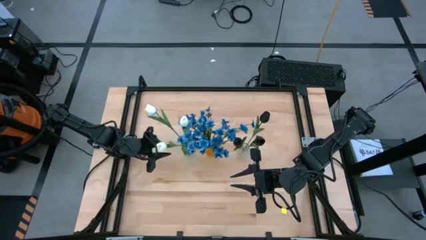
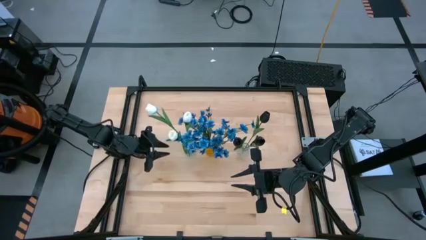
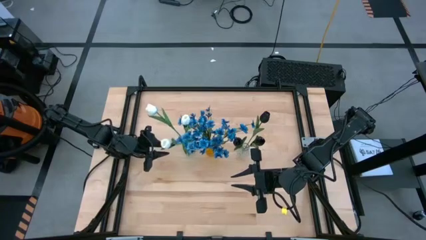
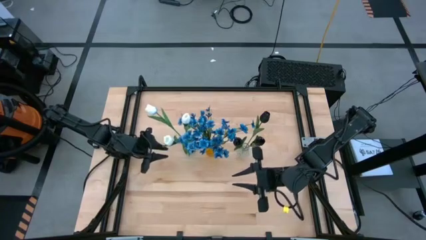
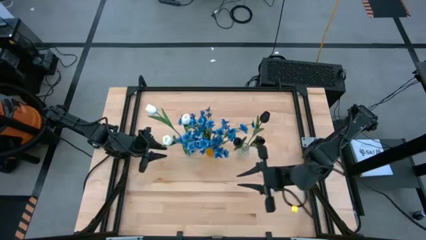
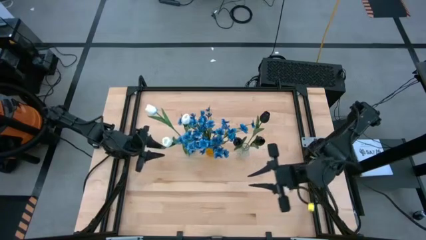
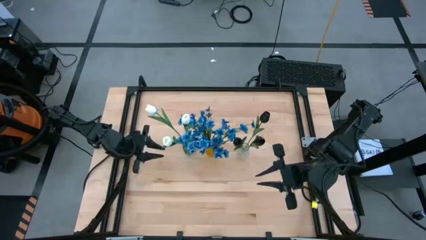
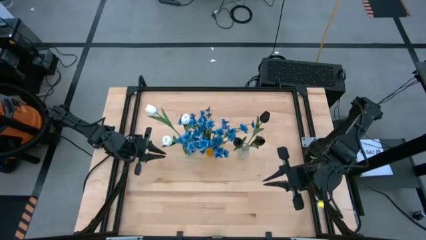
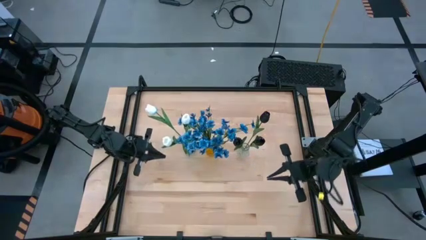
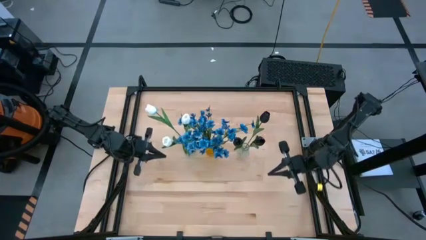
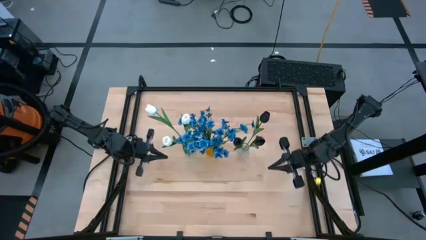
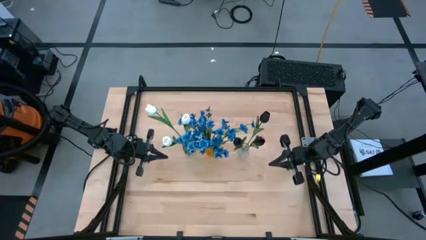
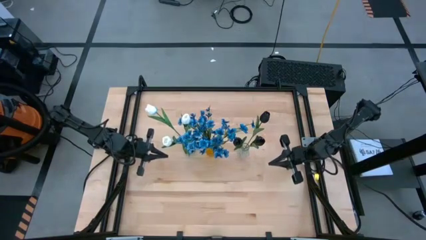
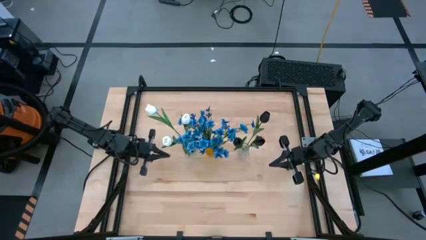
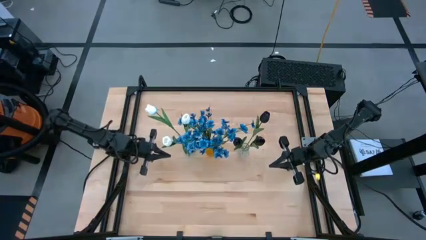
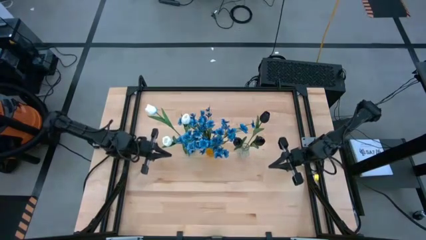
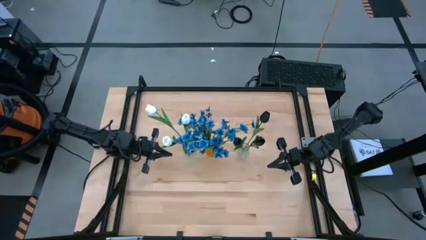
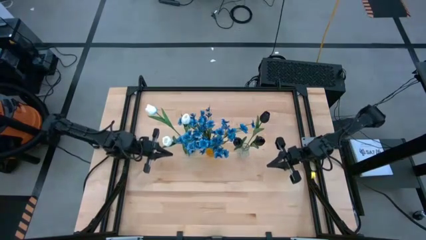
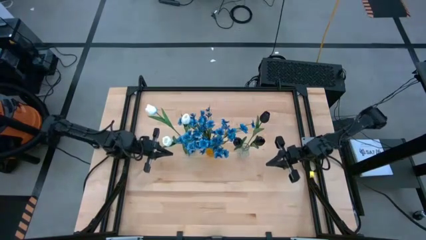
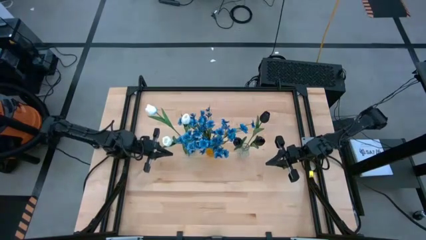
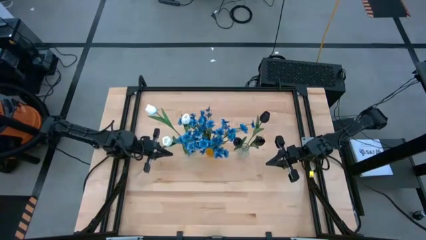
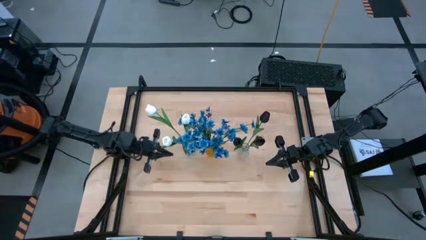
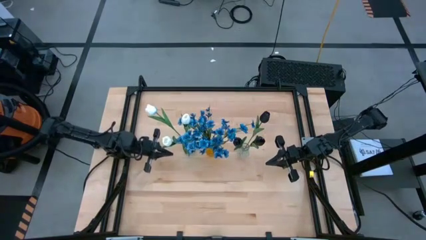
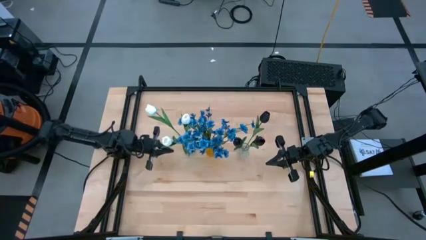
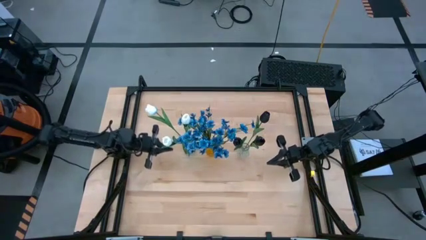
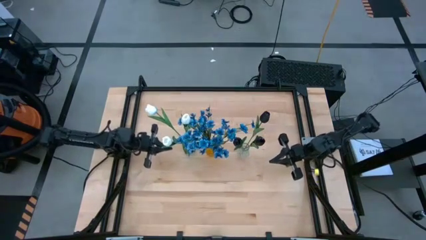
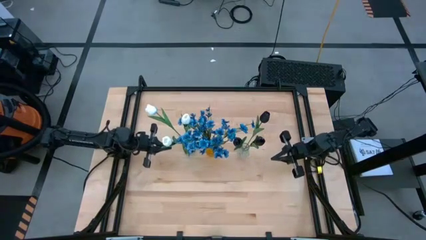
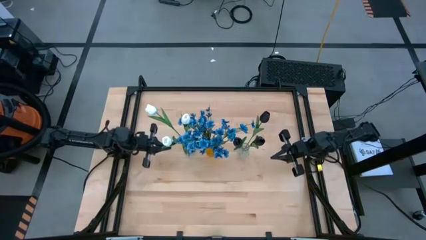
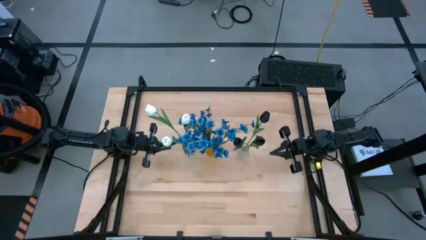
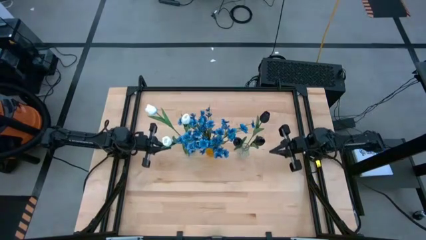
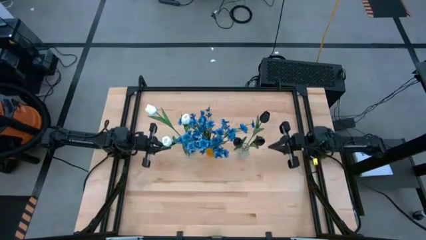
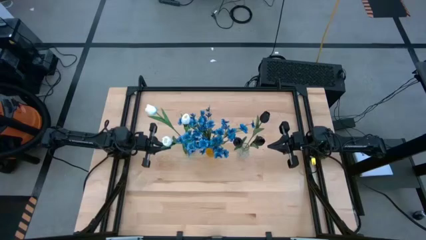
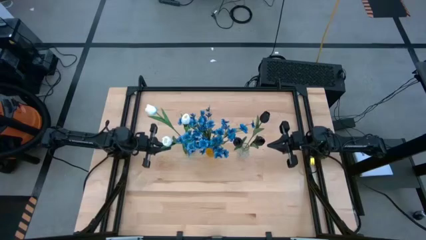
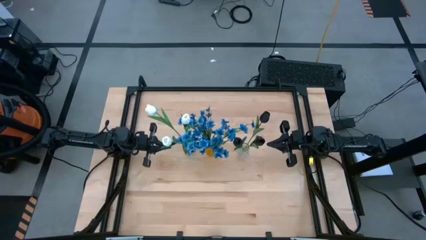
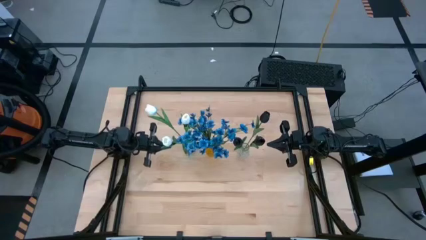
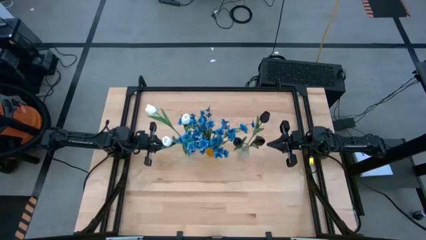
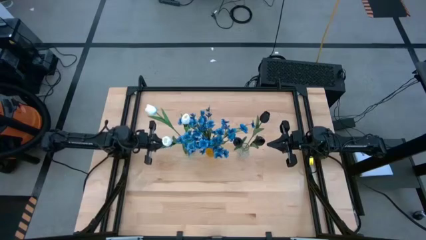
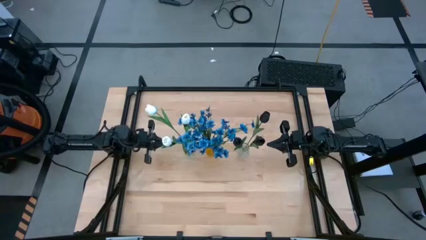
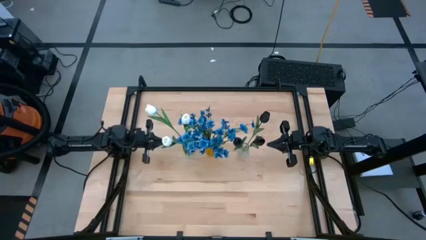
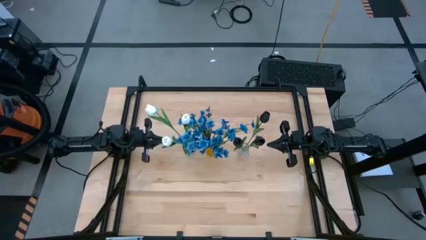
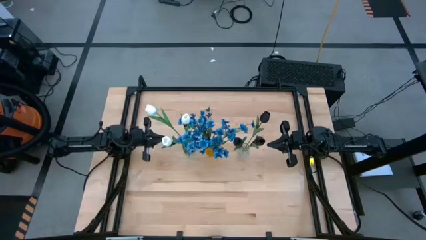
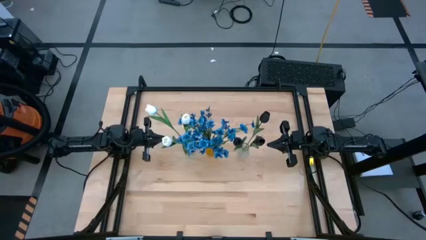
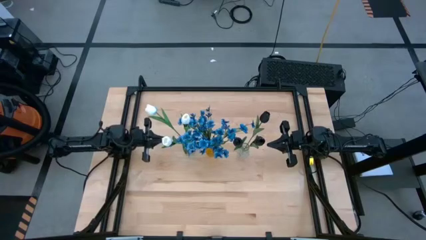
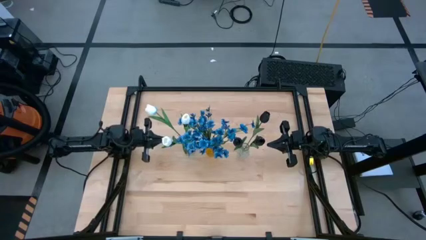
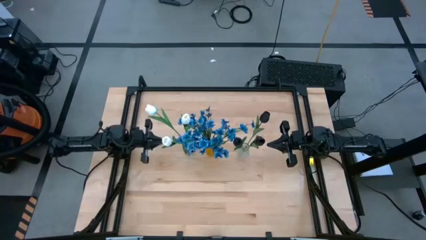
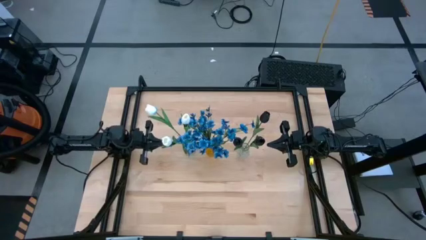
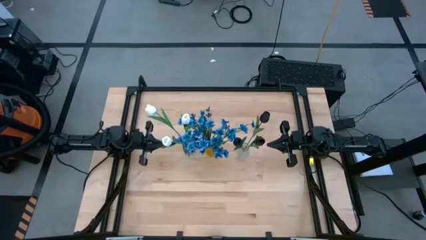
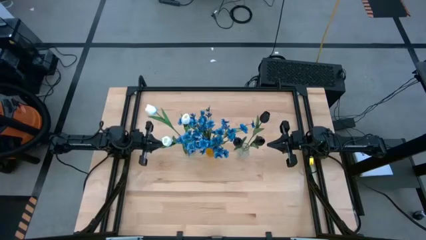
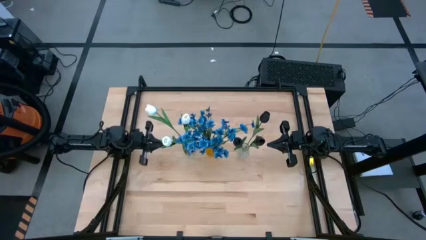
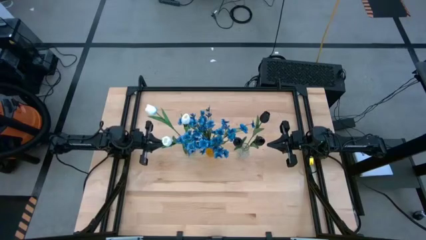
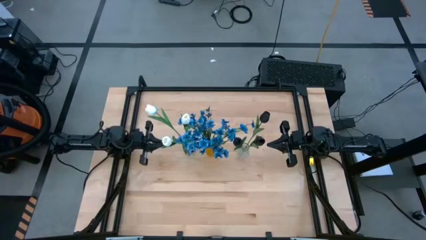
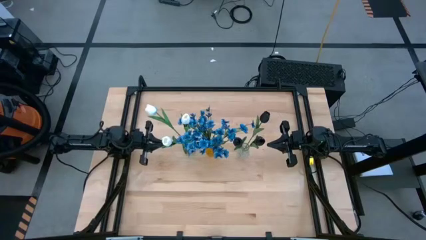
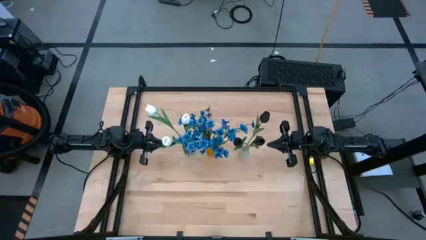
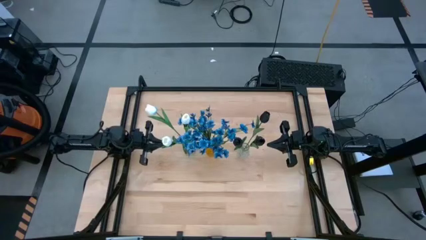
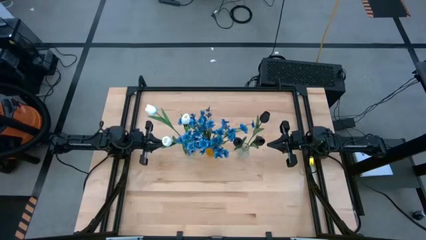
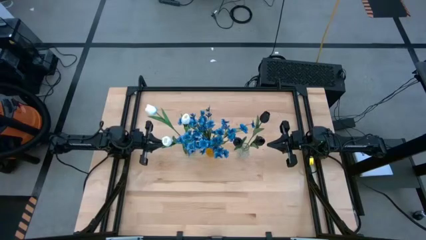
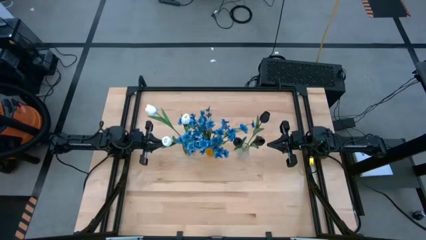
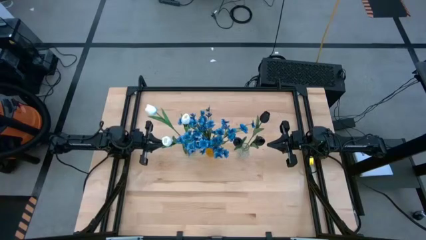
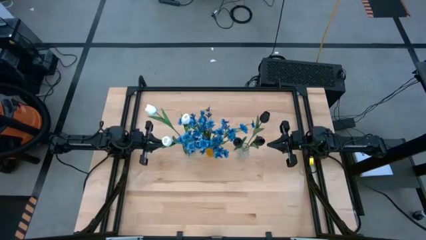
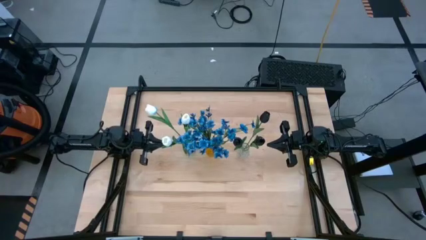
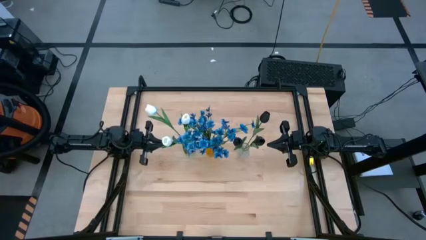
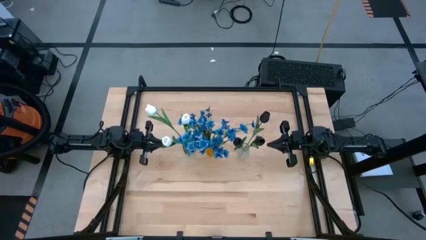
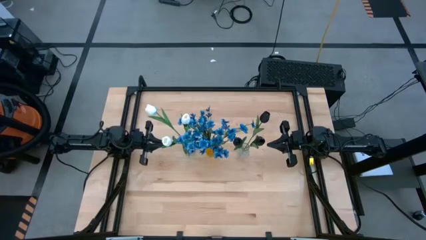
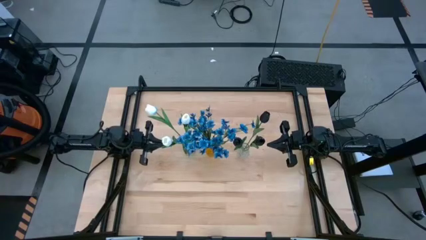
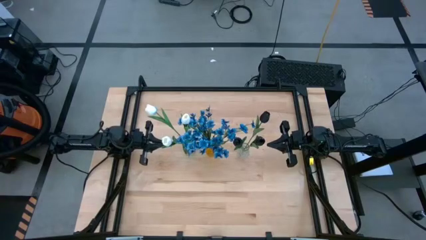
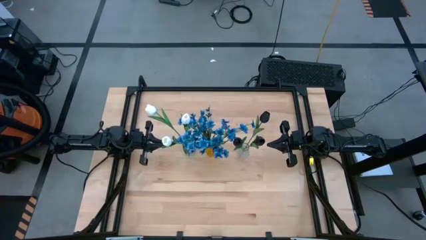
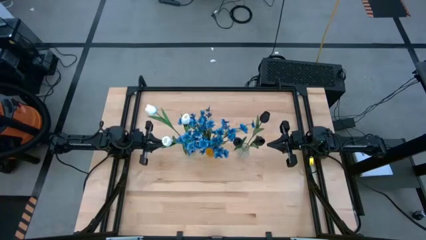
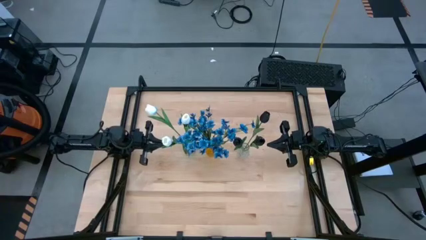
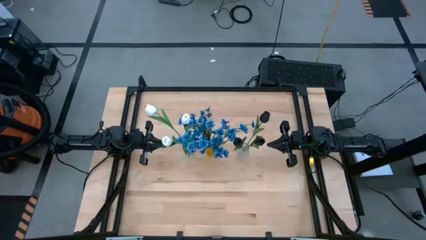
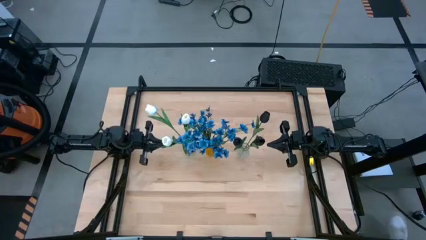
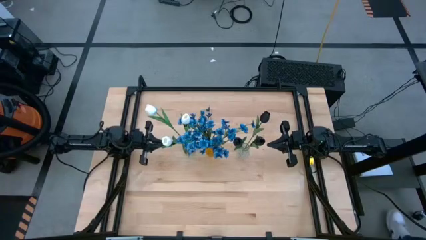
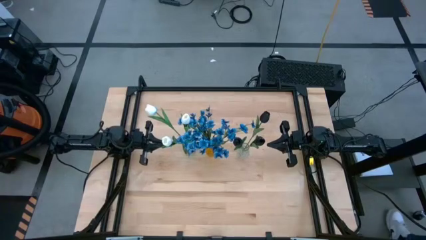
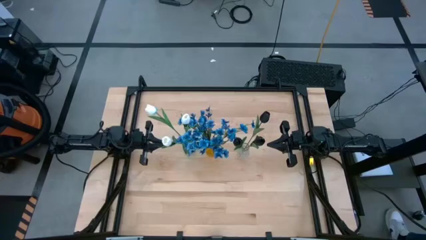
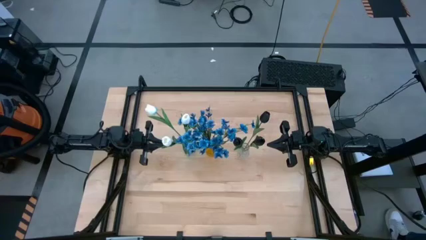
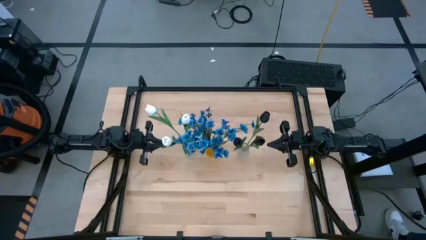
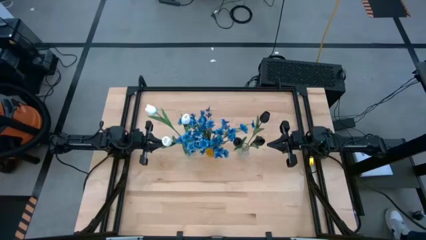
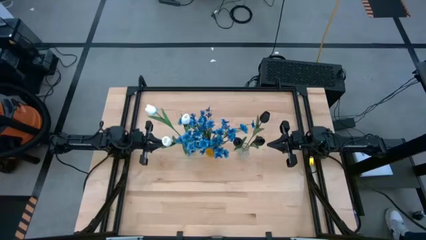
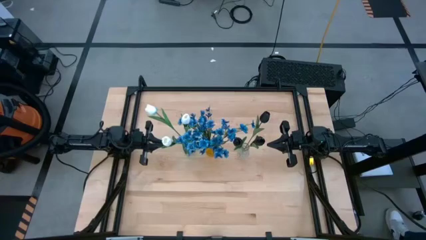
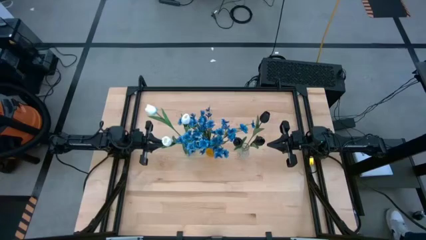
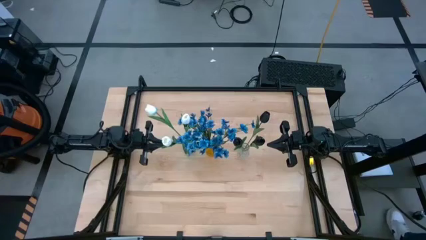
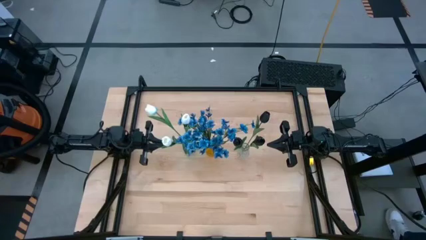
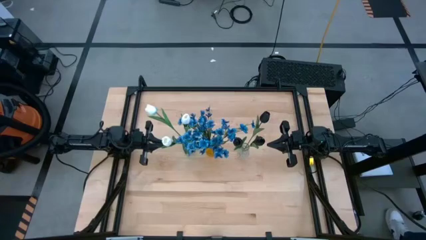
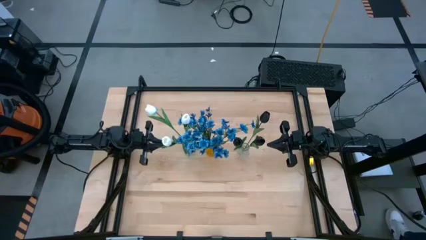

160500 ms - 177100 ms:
Task: Sort flowers into vase by color
Return to Home Position
